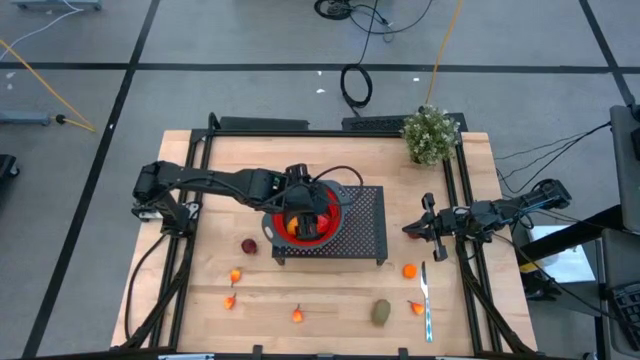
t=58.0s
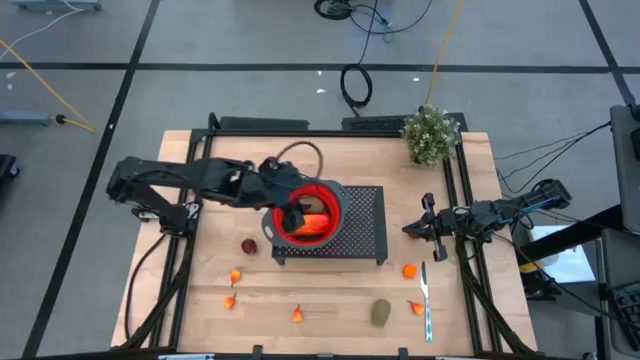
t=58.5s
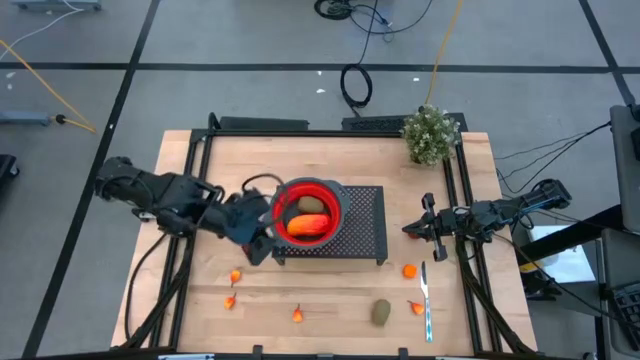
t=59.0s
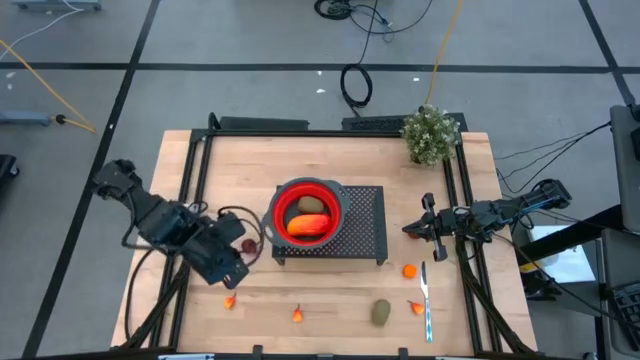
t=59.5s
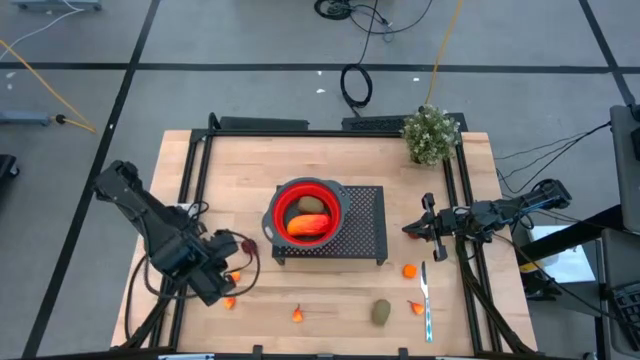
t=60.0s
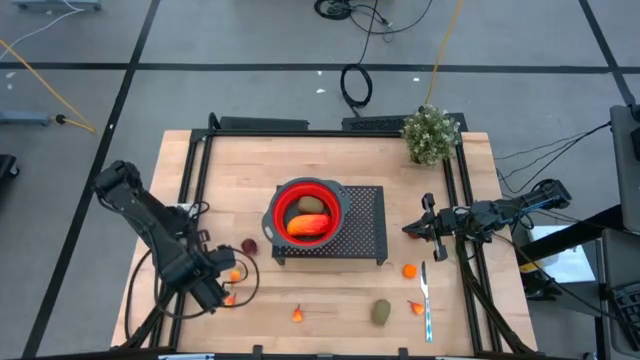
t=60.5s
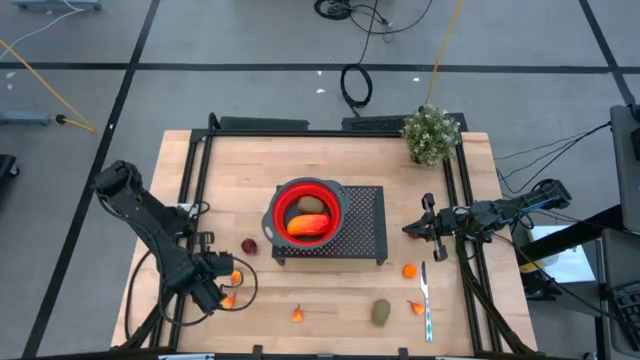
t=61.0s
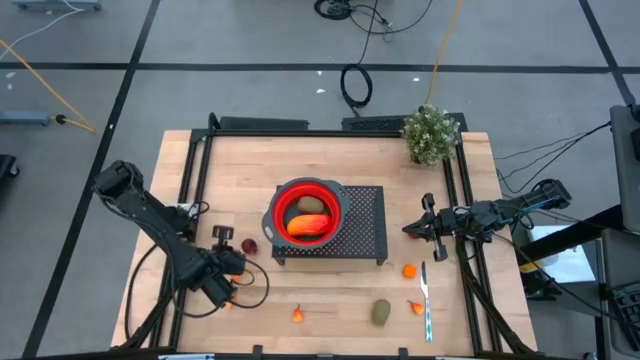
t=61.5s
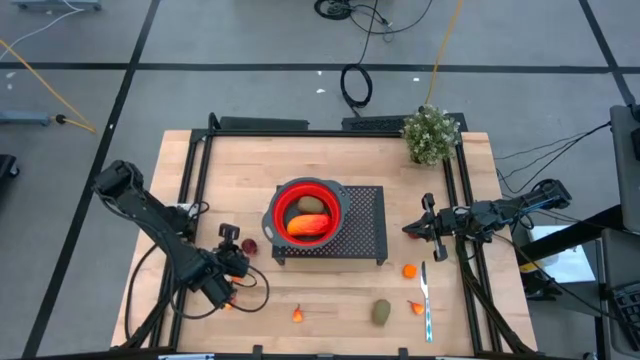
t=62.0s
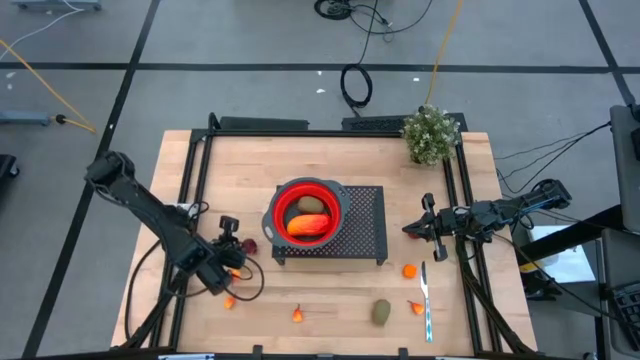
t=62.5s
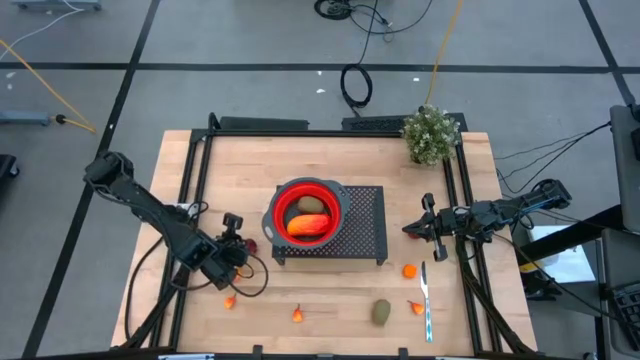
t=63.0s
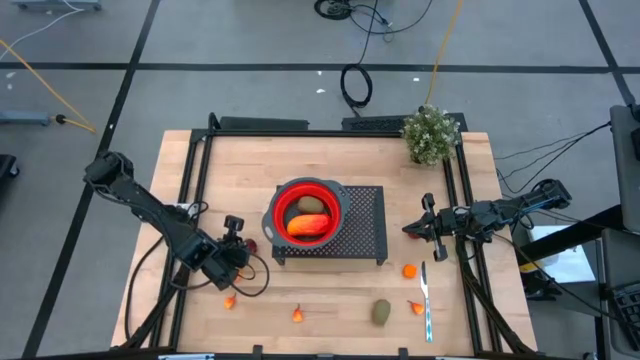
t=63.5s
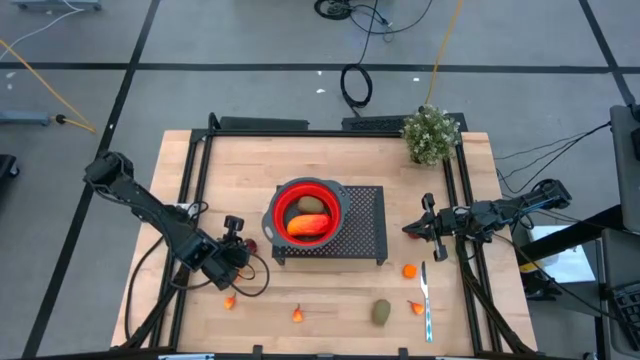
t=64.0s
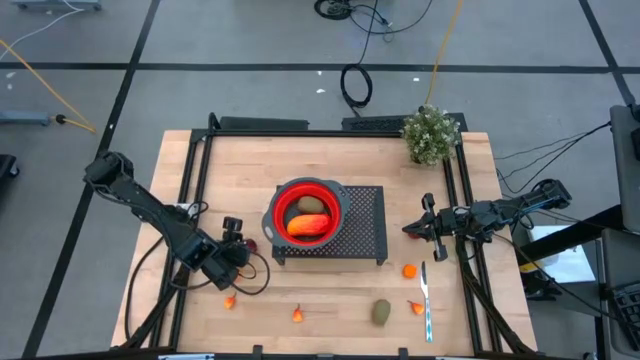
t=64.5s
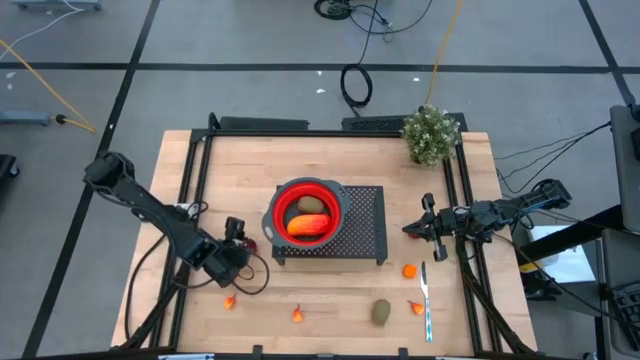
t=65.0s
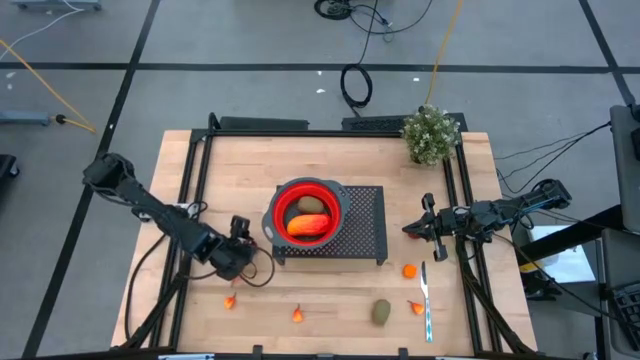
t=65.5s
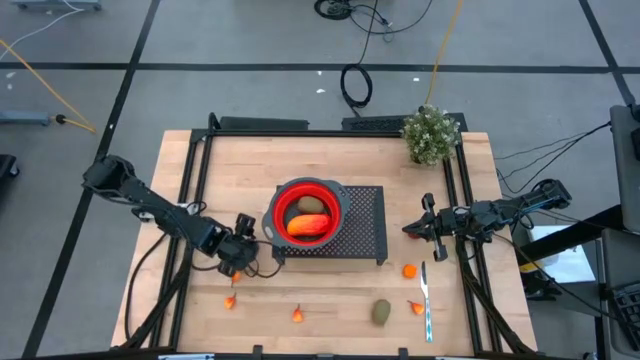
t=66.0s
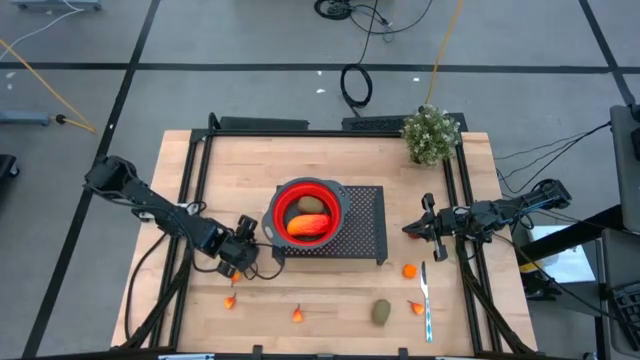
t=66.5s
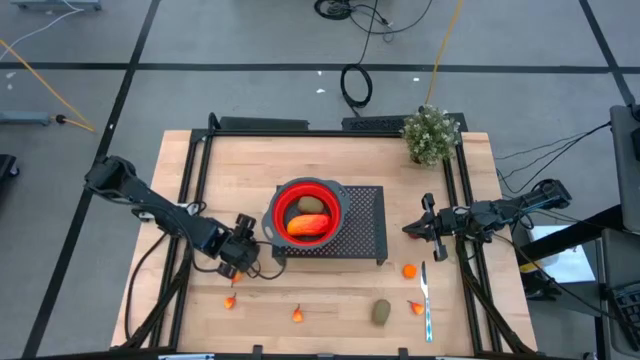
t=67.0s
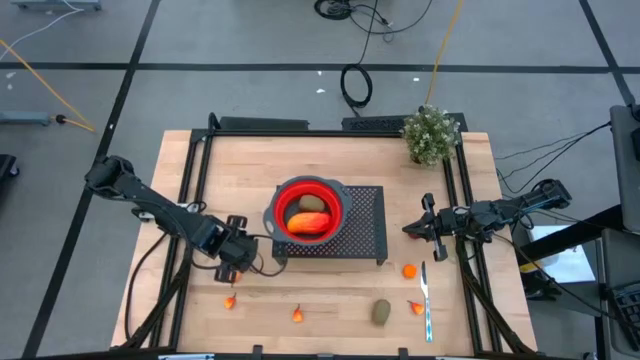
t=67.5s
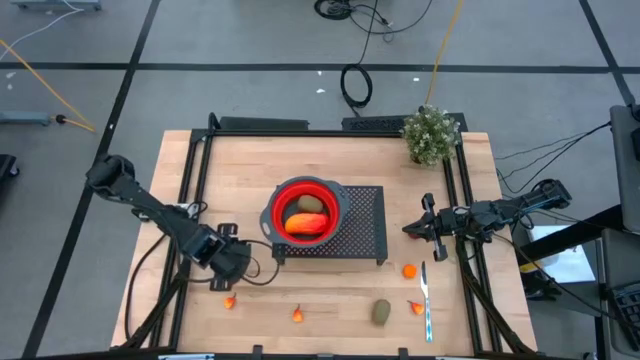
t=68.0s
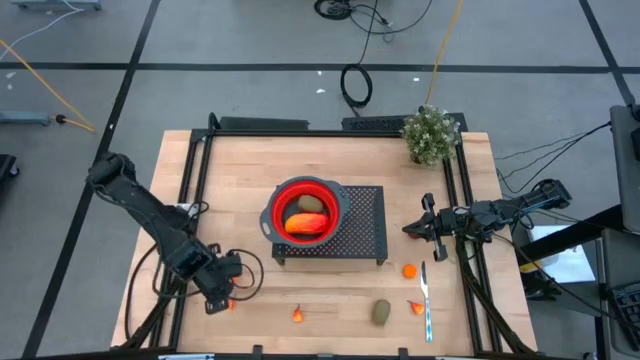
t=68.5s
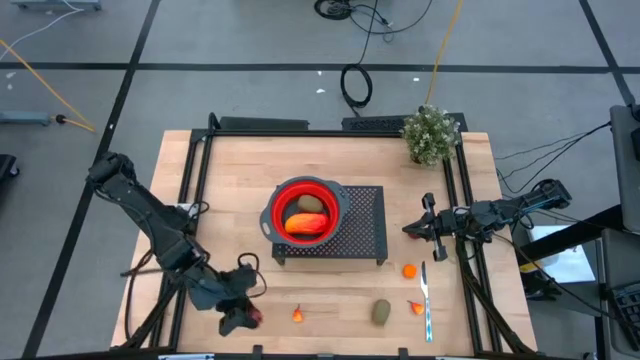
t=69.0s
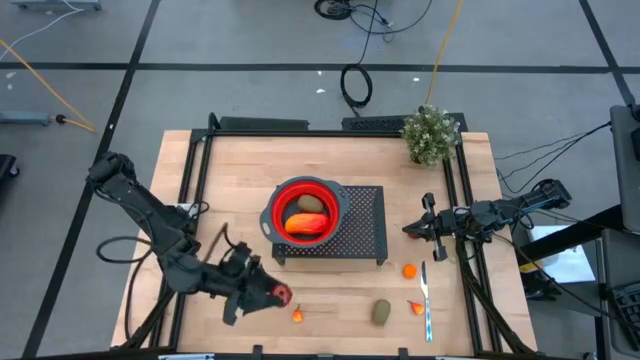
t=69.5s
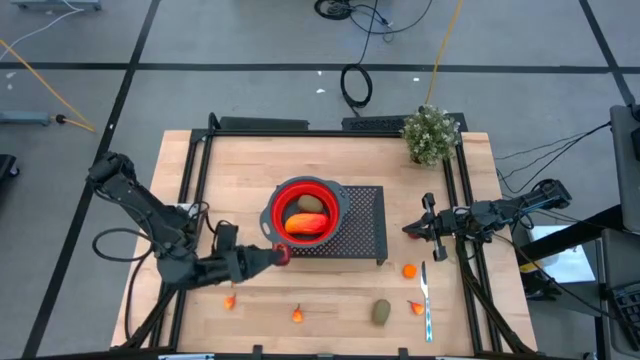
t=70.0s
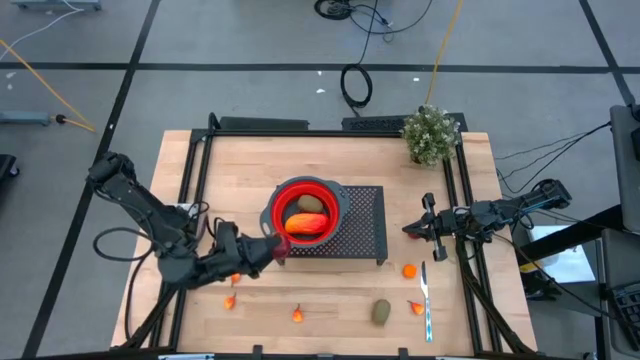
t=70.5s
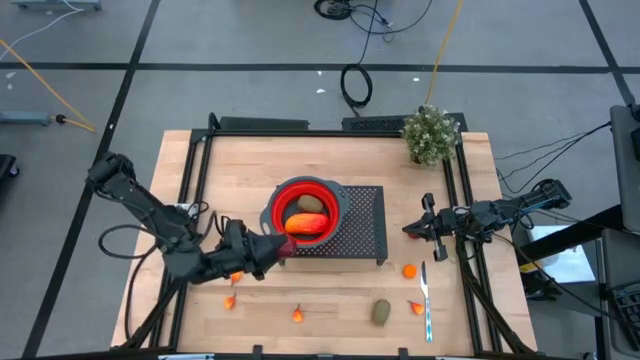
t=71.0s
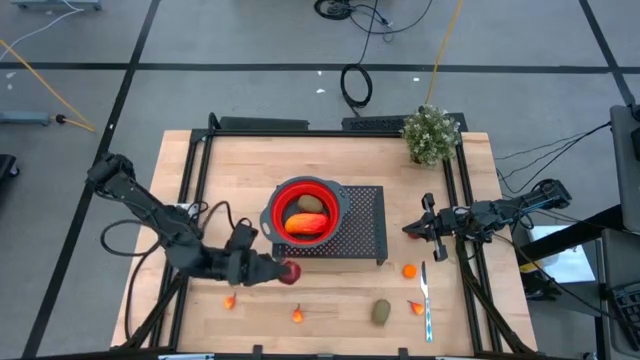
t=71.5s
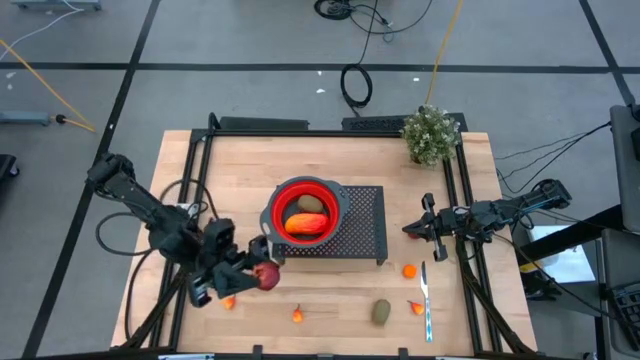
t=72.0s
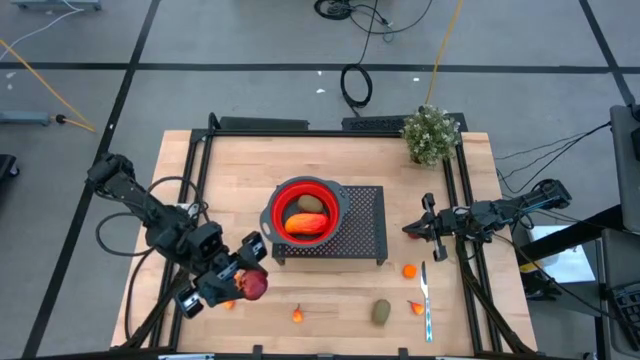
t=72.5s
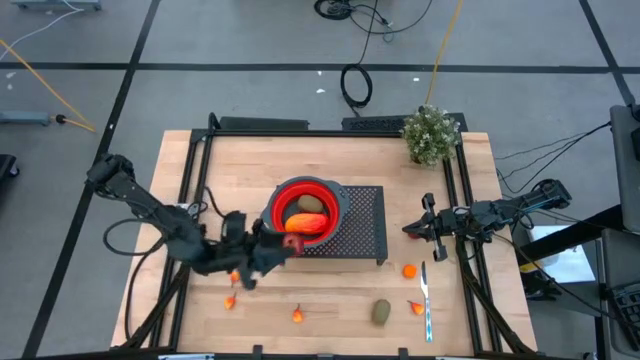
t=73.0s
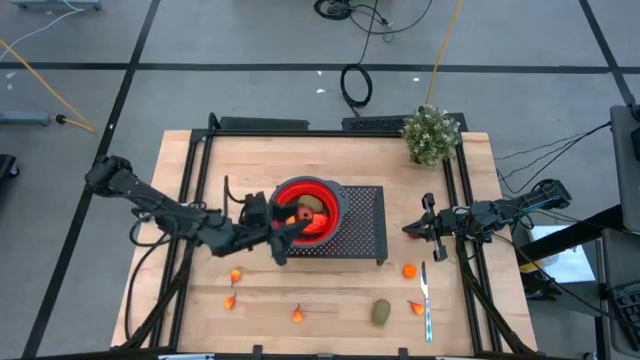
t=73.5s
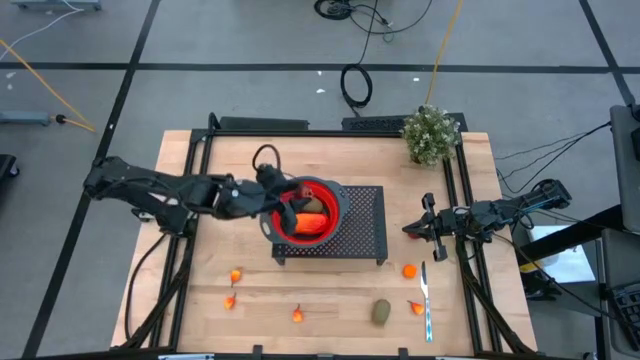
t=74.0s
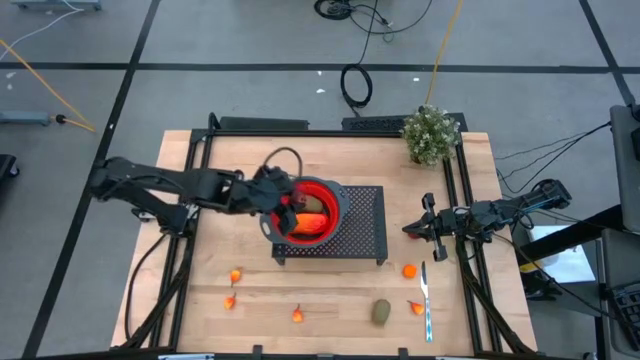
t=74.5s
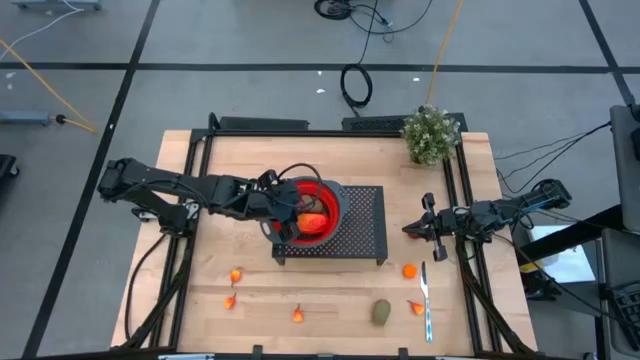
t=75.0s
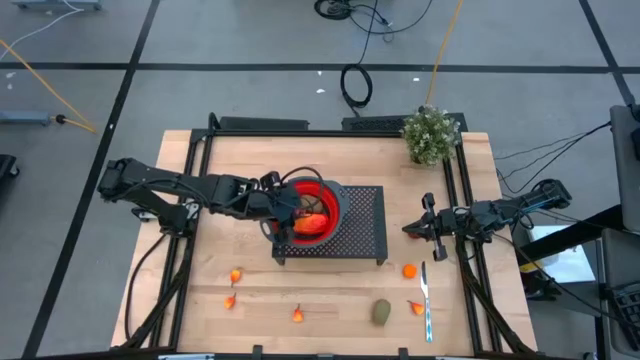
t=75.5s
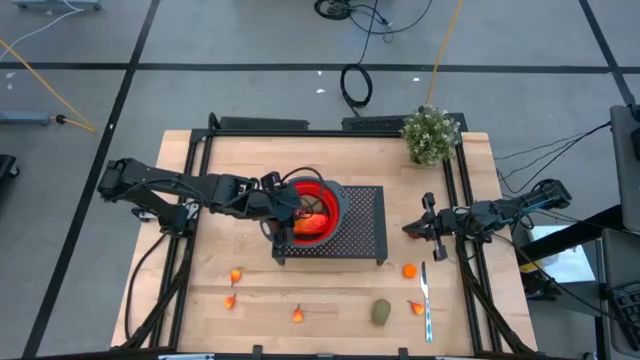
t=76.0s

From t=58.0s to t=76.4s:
Task: Pick & Place Fruit
Put the red pomegranate into the red strainer bowl on the shelf

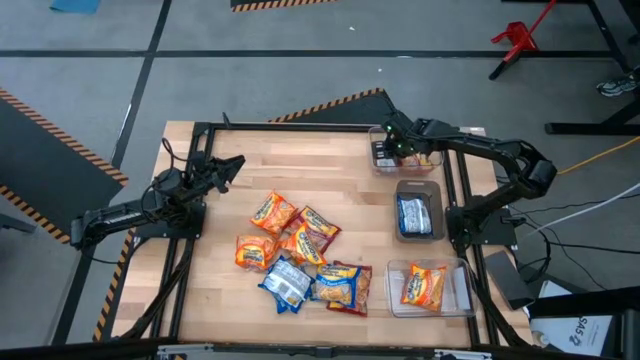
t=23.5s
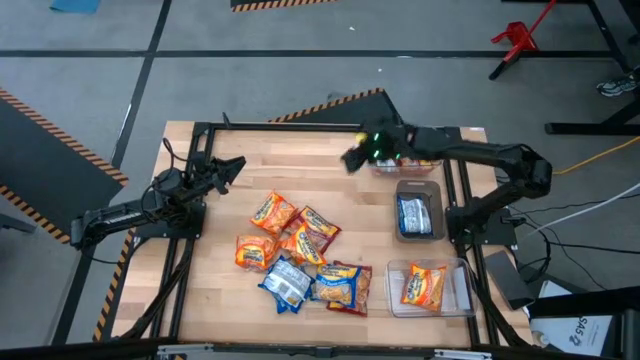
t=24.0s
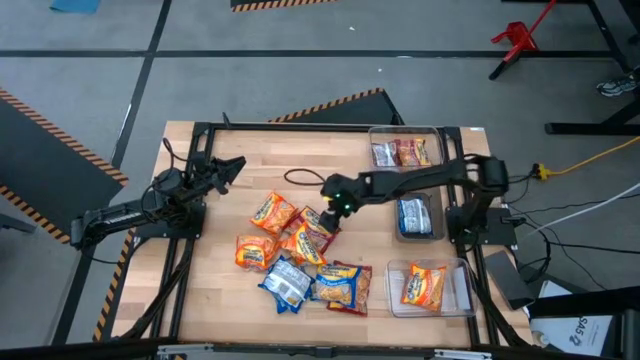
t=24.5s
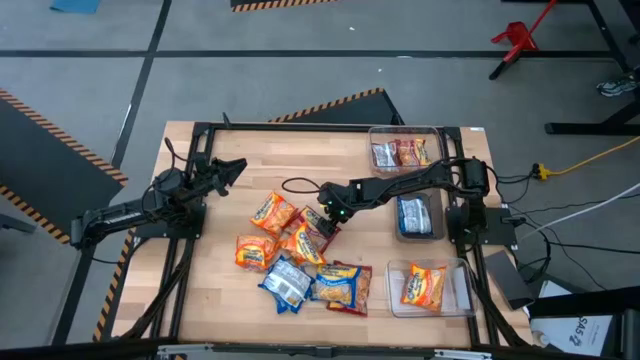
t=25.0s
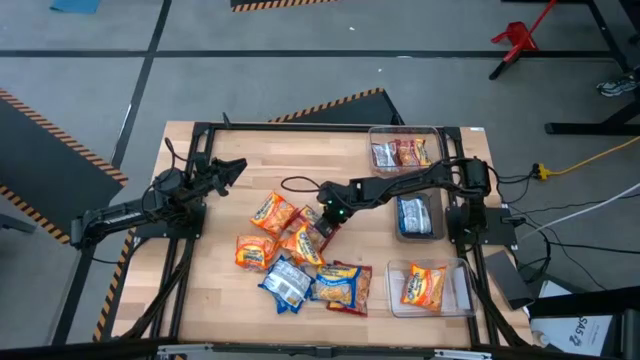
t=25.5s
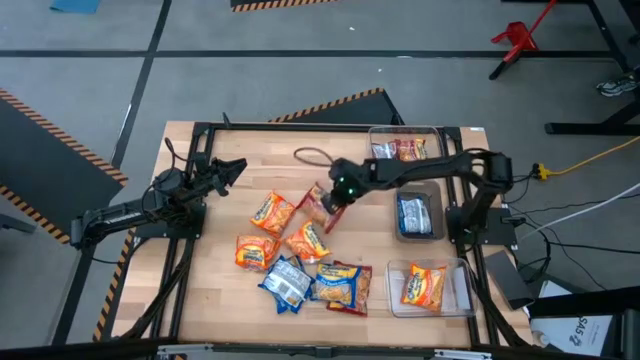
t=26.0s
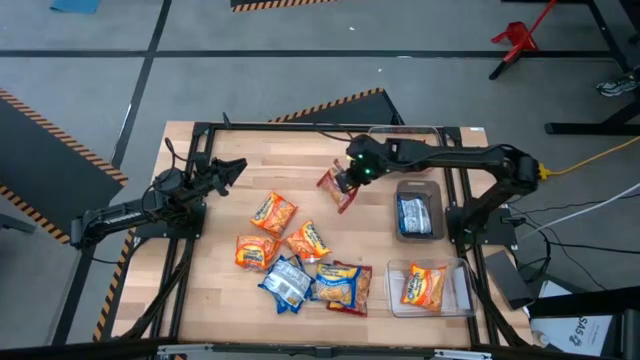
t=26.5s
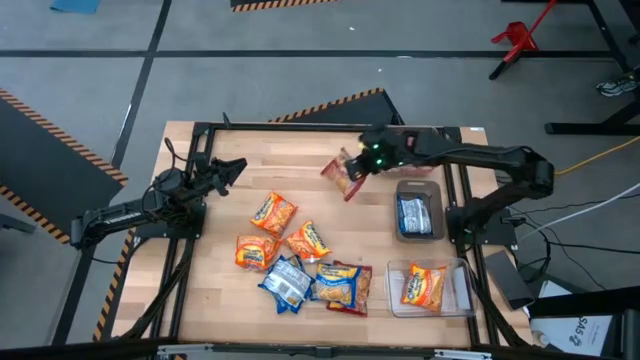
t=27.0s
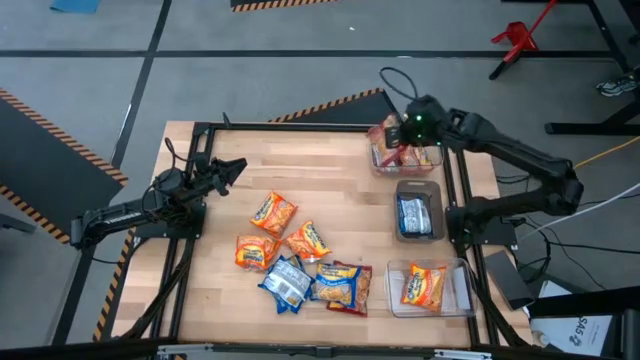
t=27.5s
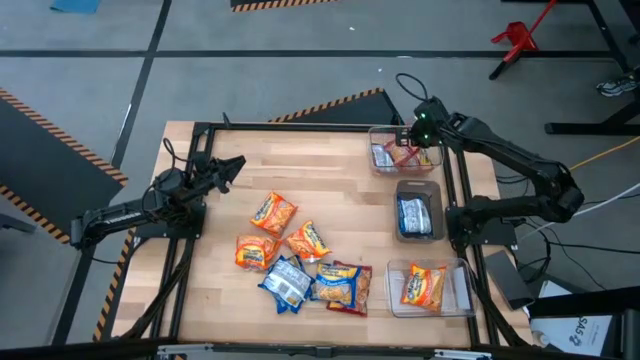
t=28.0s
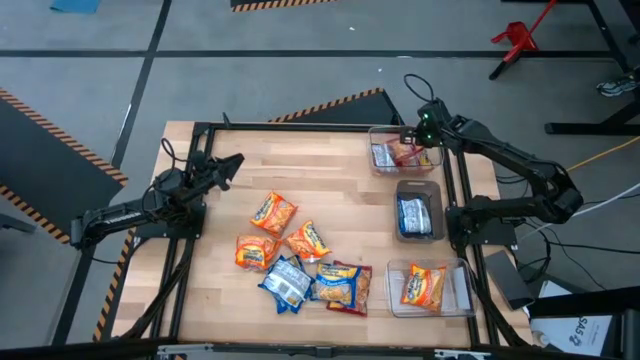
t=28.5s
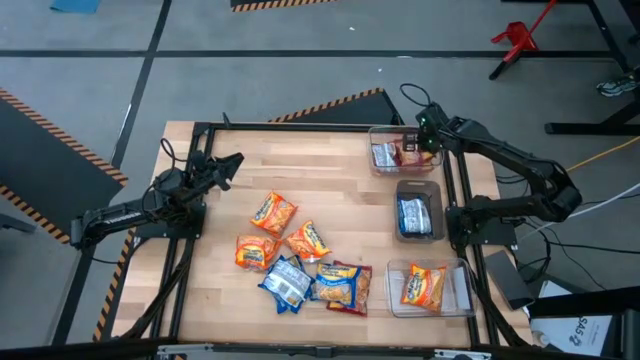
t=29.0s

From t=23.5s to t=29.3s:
Task: Sort Maruchan noodles
Put the red noodle pack into the top transparent bin
